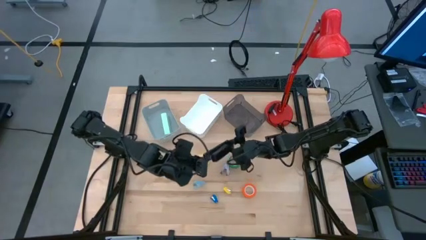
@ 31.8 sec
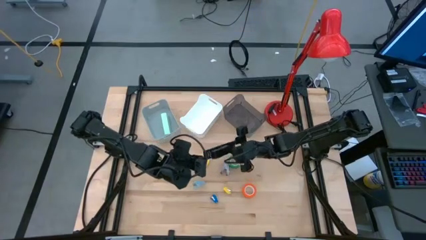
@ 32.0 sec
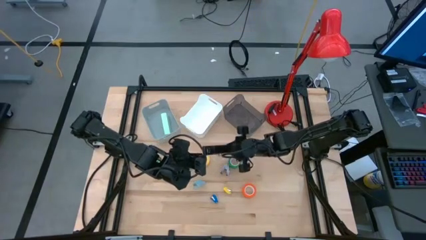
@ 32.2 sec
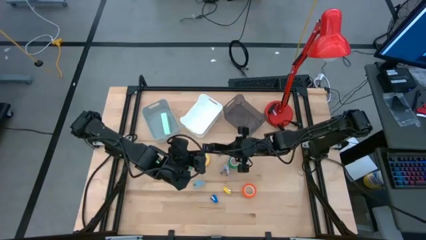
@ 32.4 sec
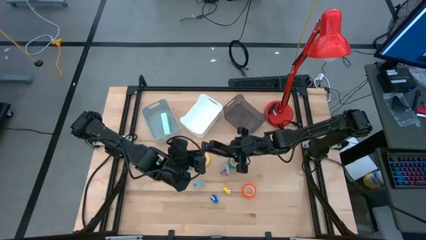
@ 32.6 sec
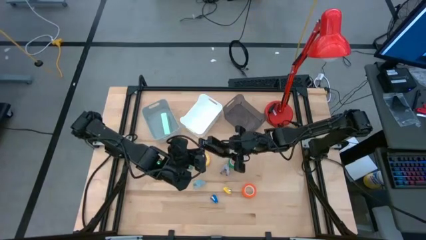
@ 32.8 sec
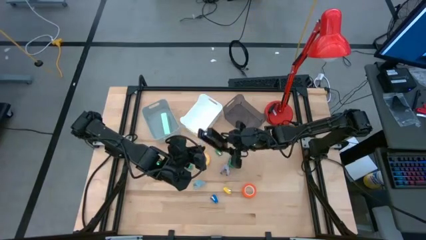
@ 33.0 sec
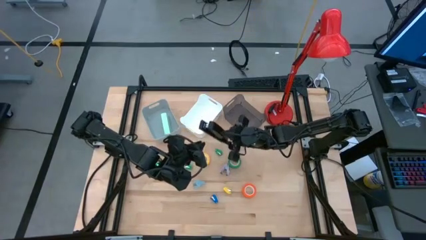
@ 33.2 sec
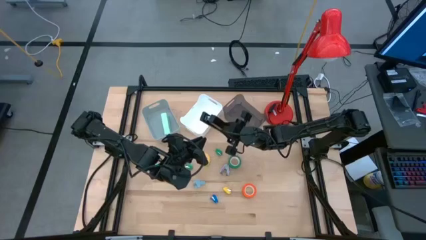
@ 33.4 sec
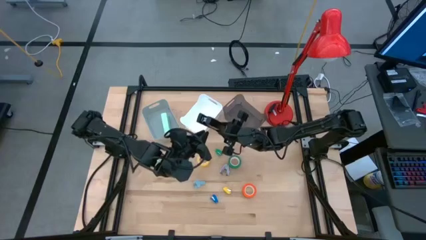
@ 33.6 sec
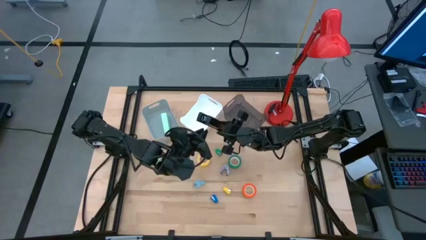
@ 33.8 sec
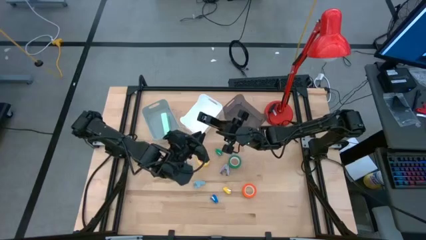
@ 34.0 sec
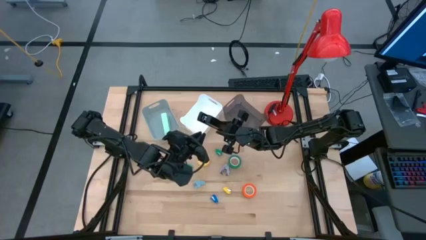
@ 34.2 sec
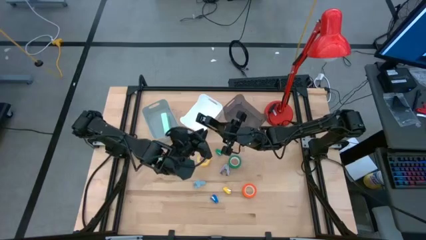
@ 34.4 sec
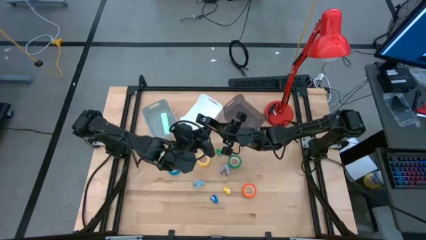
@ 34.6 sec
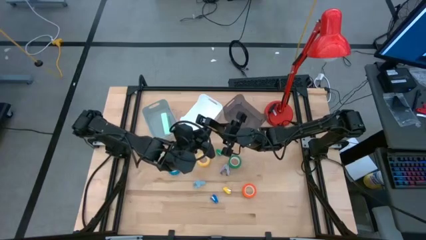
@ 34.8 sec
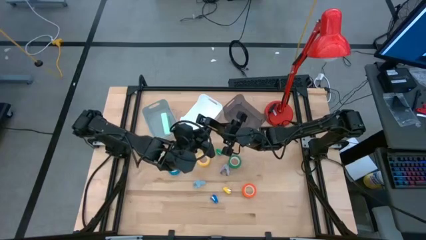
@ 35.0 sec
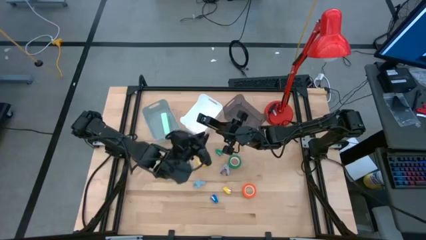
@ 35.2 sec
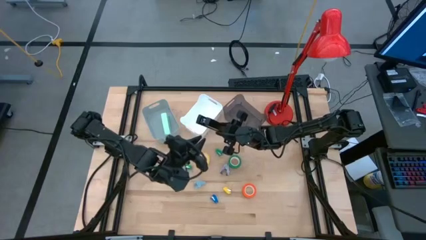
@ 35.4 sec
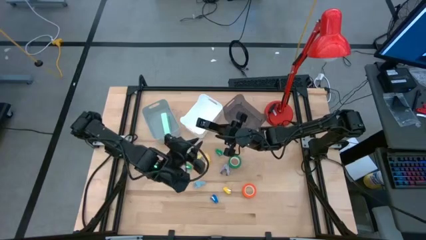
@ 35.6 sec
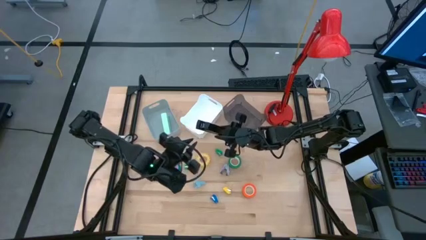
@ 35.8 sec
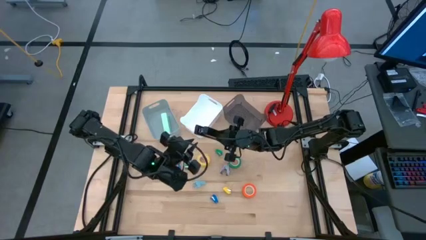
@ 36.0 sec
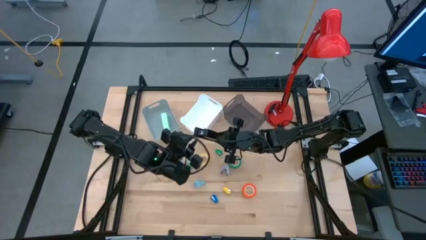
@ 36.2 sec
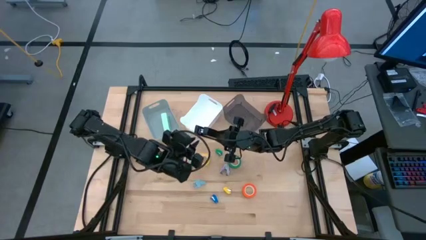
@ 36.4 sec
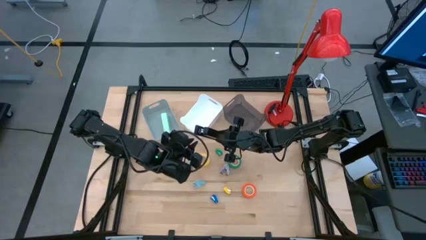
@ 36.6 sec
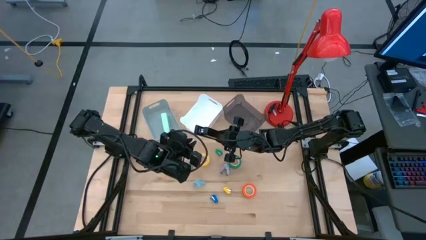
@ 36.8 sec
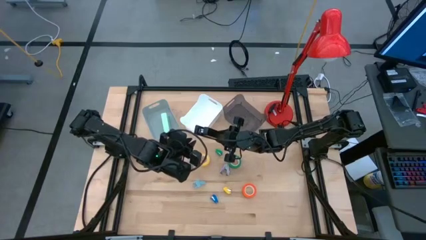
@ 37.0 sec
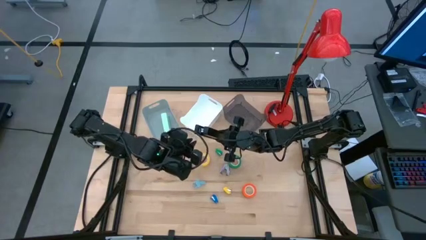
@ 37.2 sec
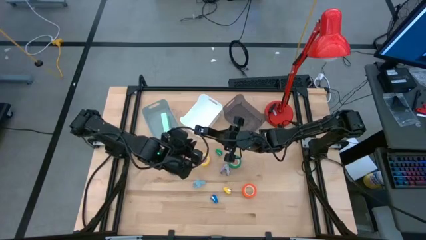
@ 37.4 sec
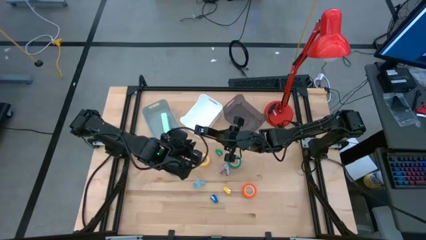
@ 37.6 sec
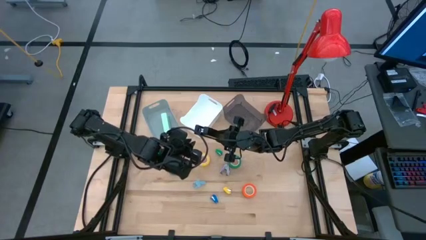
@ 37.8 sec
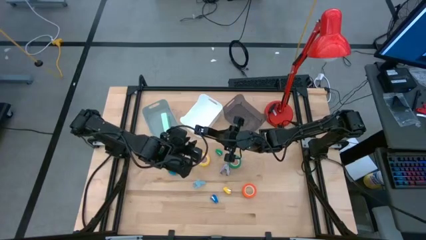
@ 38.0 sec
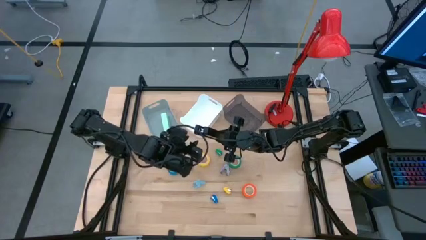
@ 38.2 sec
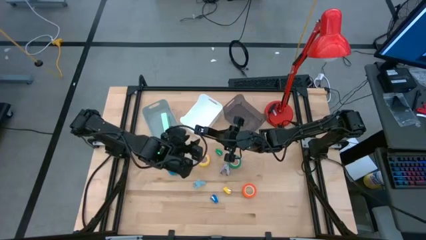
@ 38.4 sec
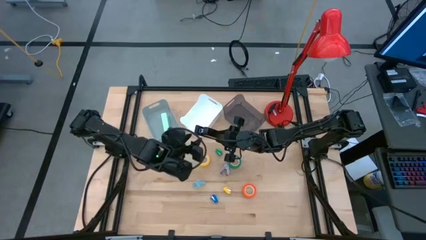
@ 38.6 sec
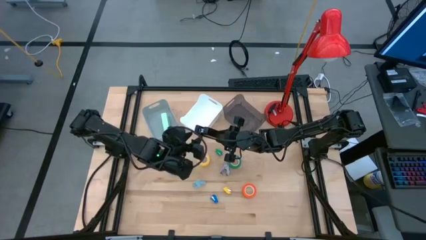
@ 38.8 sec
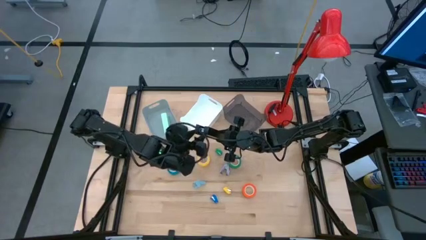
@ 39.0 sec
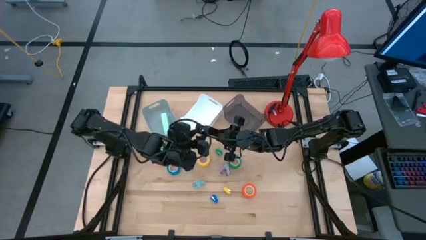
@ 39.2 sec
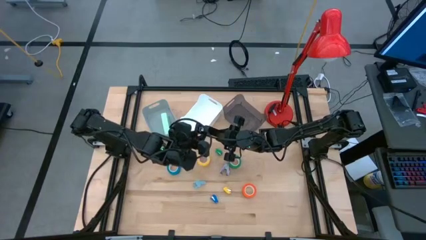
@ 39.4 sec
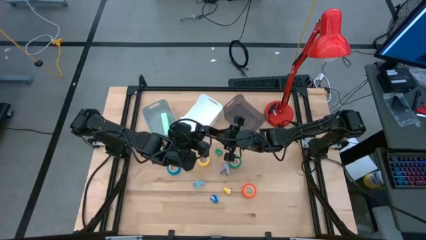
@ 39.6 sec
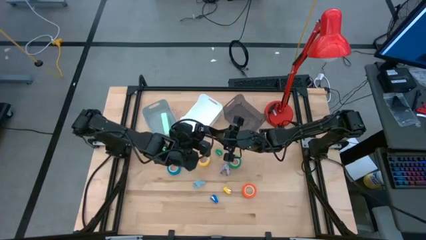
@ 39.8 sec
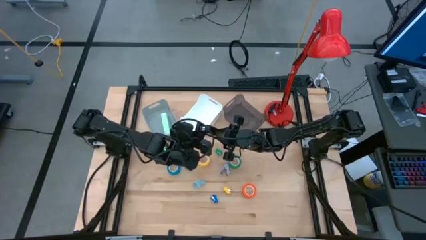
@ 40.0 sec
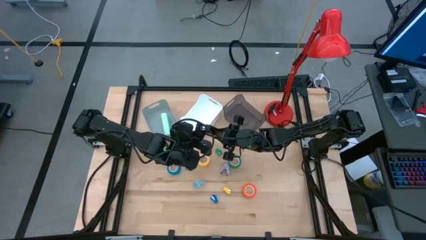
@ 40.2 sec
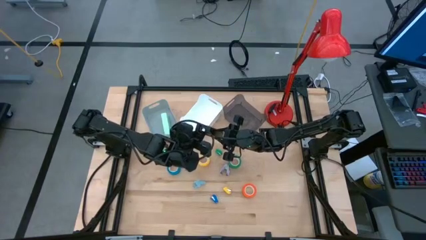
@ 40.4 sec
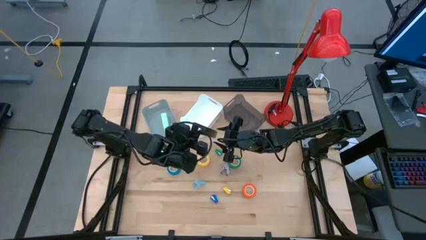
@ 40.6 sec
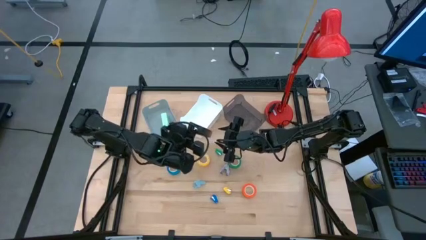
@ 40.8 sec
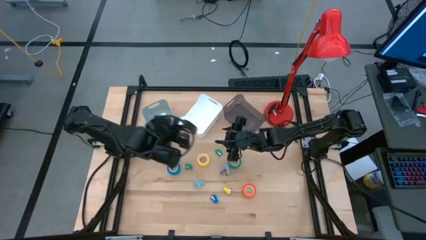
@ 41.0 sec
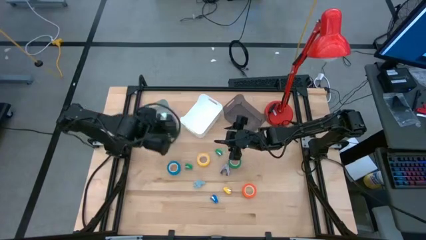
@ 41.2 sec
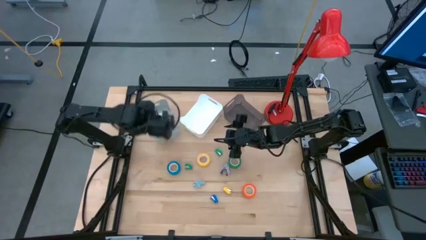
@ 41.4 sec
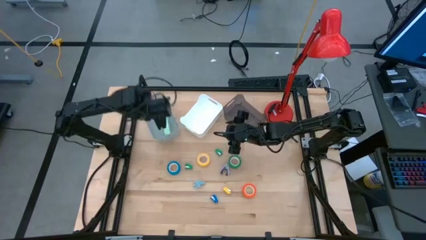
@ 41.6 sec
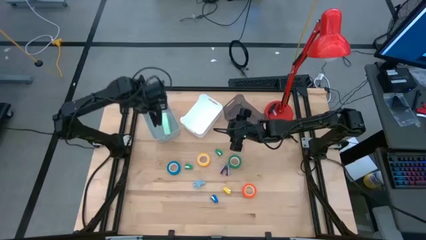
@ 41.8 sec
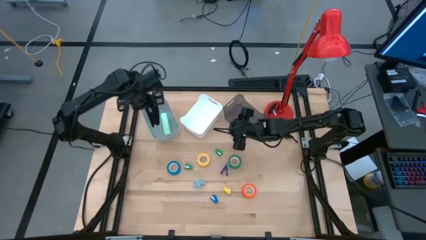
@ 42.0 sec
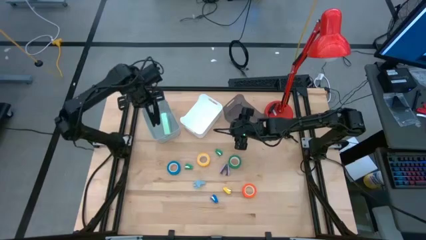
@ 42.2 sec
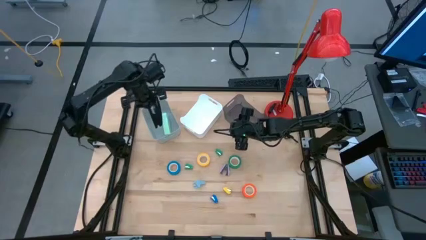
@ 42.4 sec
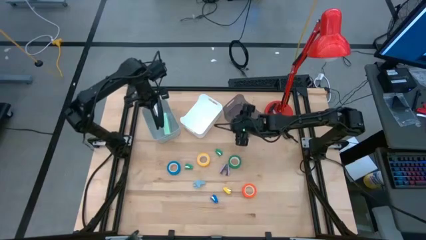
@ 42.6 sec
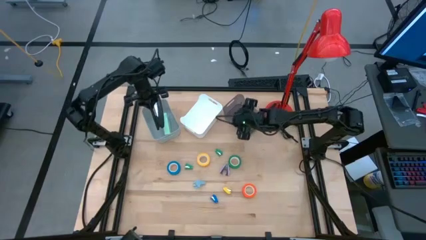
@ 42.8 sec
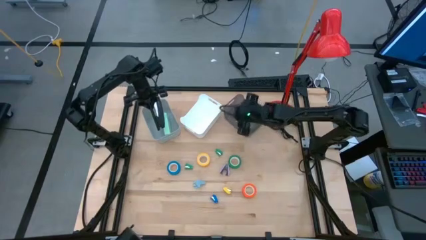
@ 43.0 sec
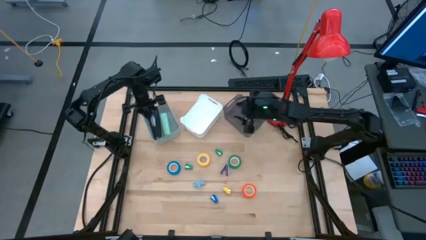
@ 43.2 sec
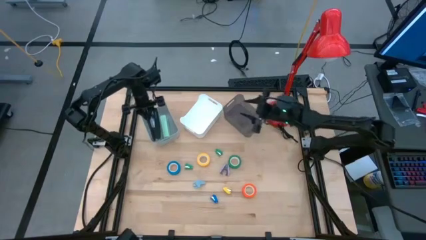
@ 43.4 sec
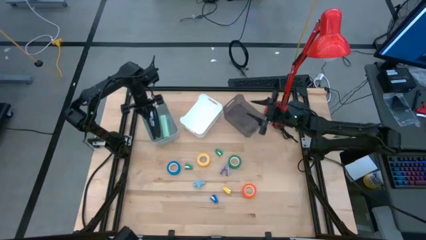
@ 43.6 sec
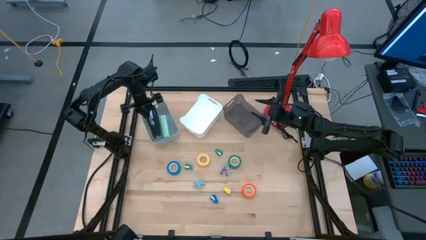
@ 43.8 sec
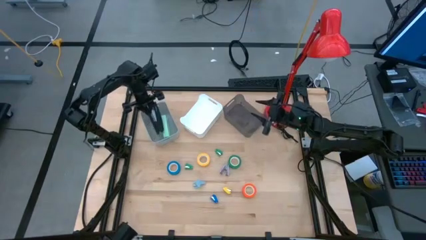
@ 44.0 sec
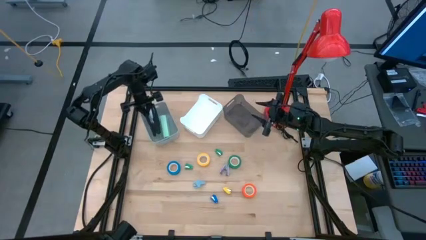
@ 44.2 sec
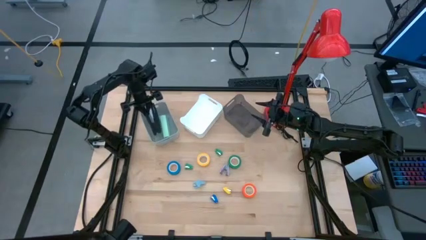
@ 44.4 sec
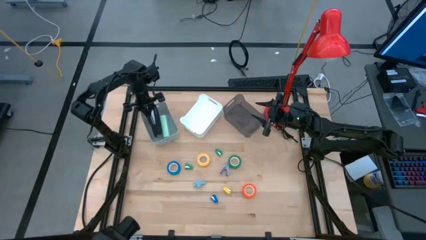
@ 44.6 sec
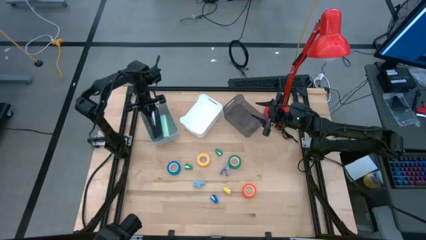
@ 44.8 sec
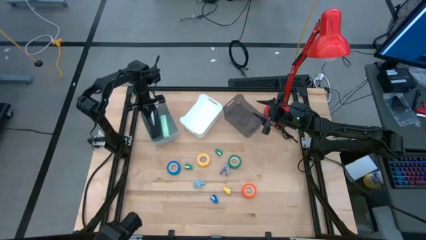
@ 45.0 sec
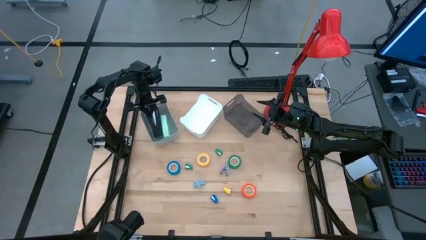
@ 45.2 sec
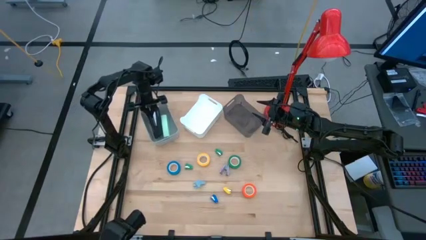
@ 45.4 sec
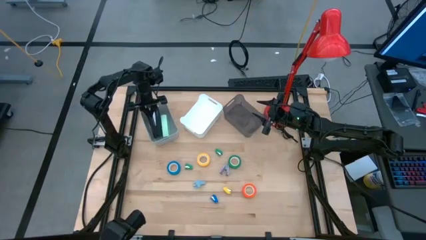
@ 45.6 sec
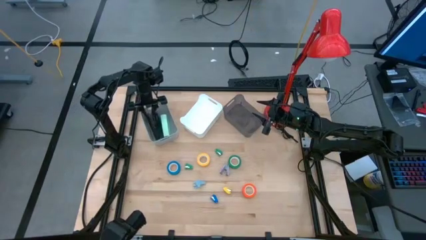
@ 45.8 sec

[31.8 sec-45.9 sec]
Task: Pick and place Stapler, Stapler remover, tape
Put the large black stapler into the gray bin
